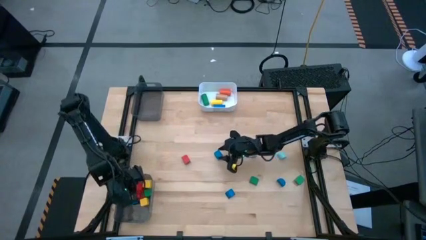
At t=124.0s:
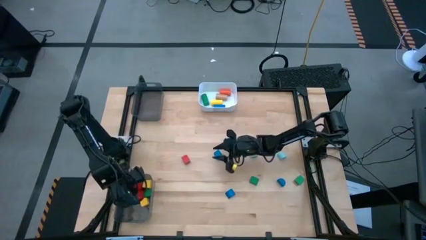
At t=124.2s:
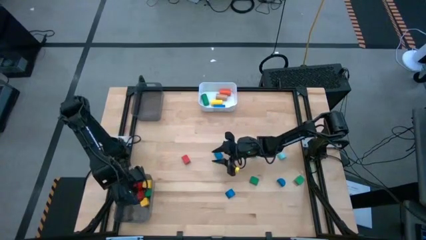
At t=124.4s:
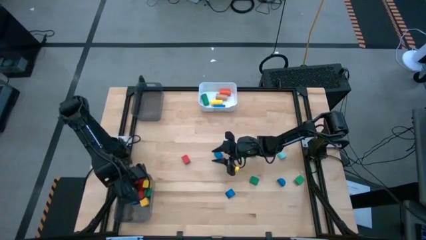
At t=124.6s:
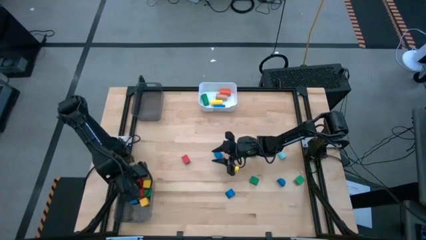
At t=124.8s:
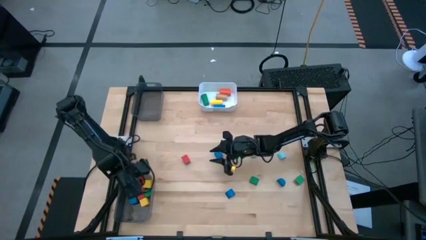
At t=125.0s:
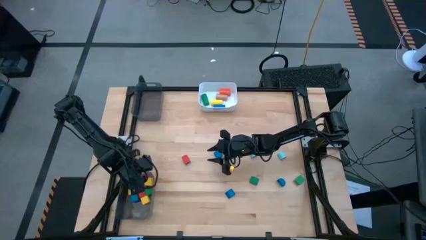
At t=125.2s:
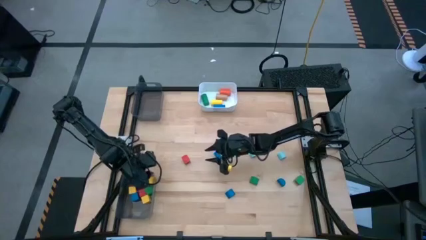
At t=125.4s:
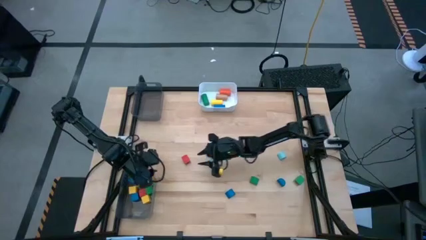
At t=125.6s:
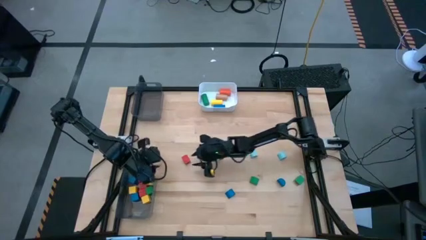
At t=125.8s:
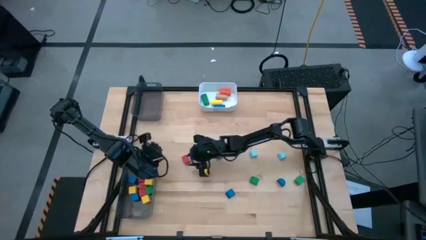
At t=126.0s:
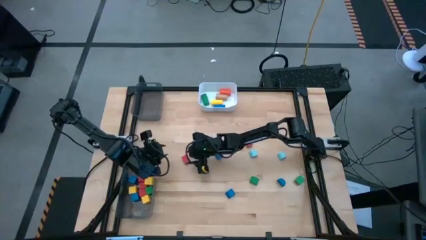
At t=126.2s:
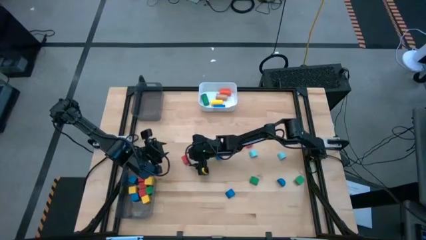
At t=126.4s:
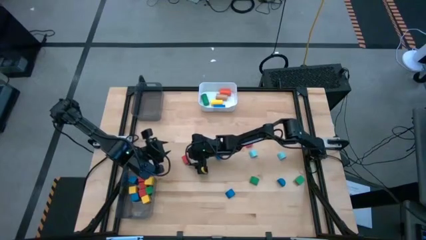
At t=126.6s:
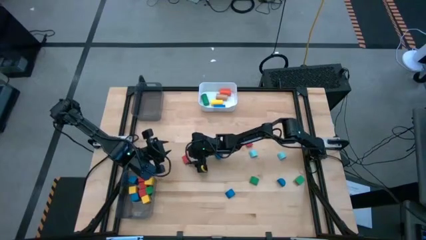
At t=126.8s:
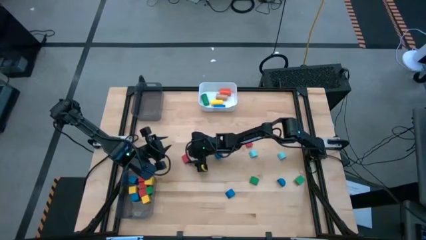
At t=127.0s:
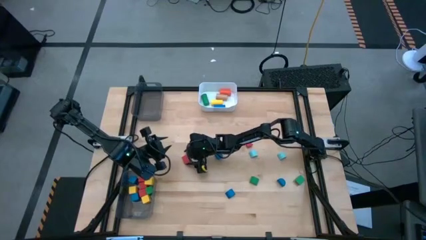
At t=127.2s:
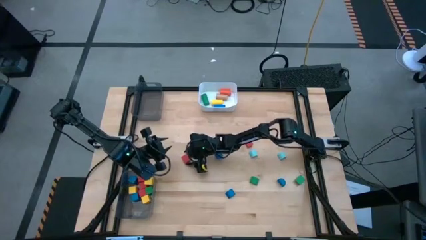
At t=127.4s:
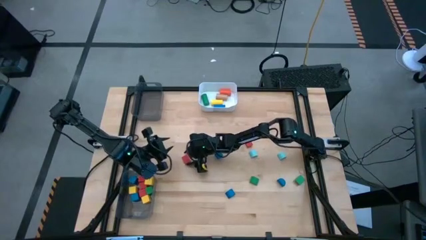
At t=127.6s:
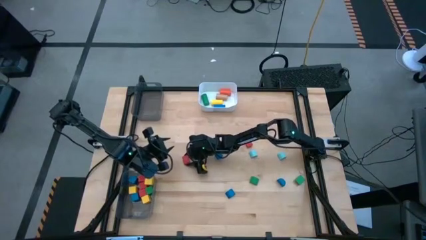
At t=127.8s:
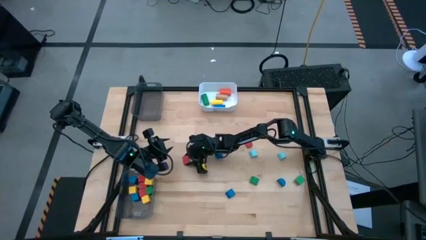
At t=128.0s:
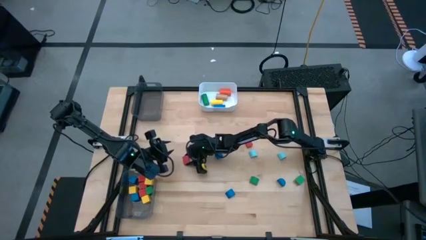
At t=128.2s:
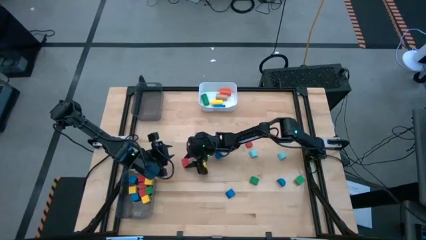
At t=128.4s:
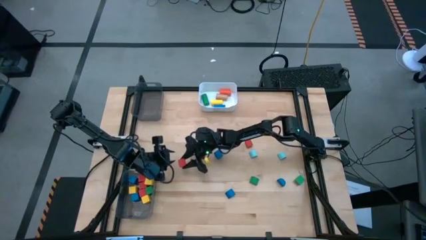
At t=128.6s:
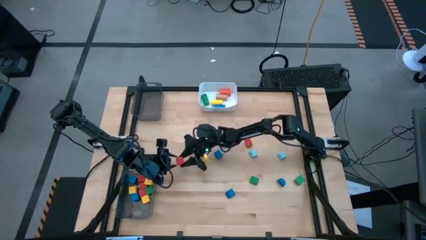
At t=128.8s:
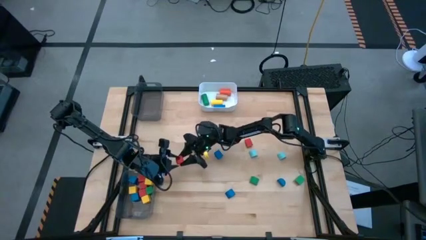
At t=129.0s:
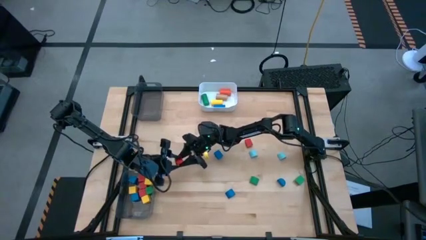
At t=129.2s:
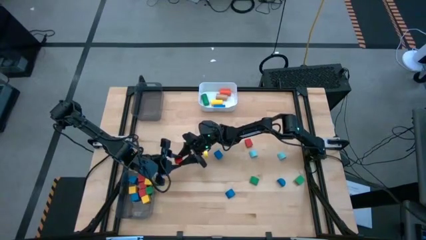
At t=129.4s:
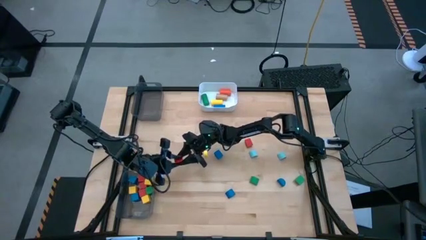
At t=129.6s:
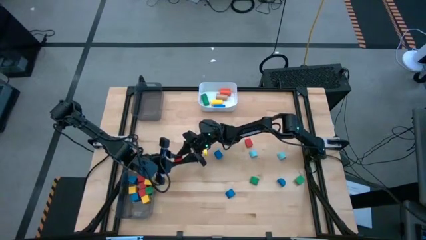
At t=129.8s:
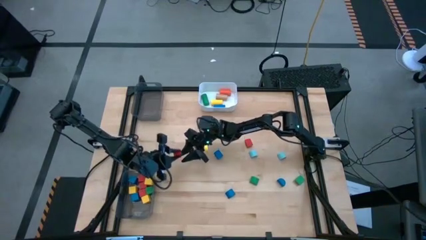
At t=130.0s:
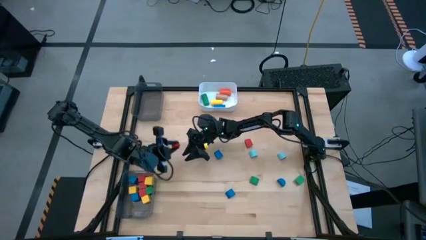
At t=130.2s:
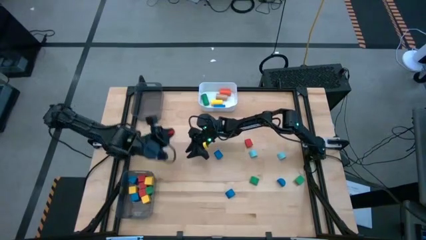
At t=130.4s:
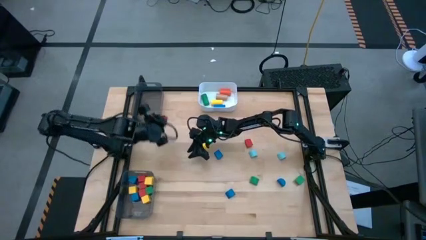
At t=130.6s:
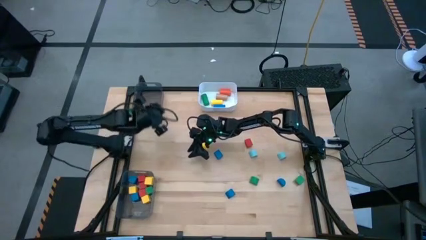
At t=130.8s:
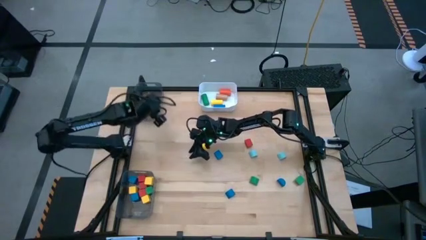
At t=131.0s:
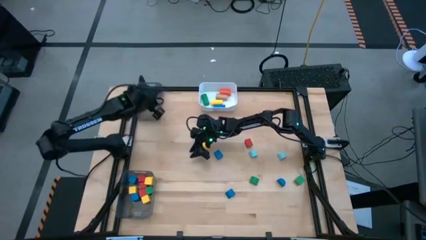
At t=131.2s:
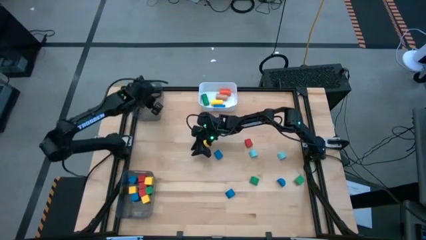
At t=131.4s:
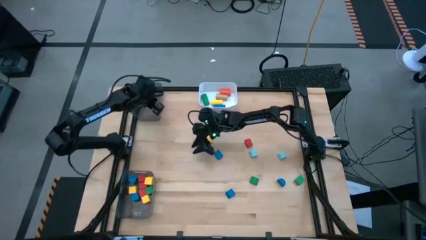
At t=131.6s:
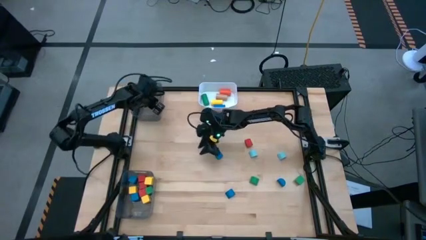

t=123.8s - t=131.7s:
Task: Sort blocks by size
Put the red semicircle block into the top black bin

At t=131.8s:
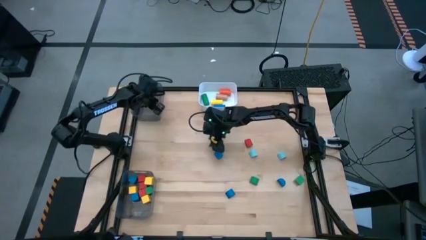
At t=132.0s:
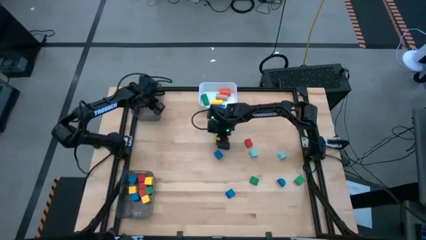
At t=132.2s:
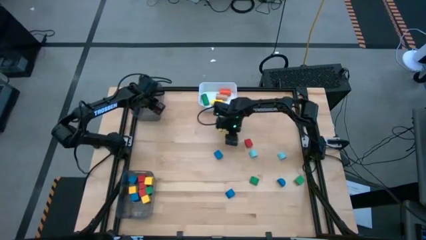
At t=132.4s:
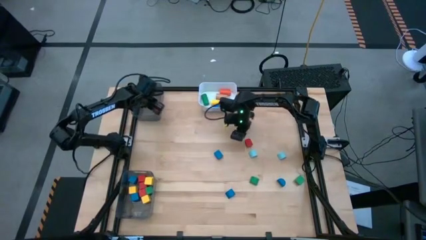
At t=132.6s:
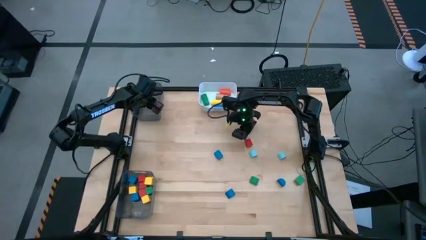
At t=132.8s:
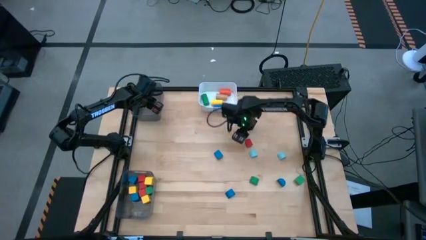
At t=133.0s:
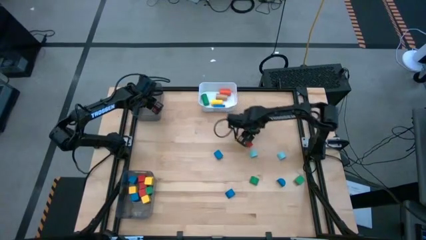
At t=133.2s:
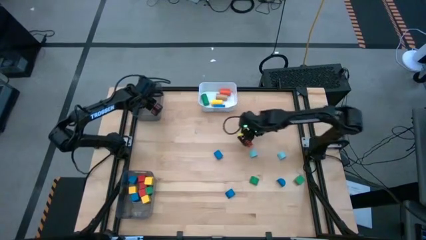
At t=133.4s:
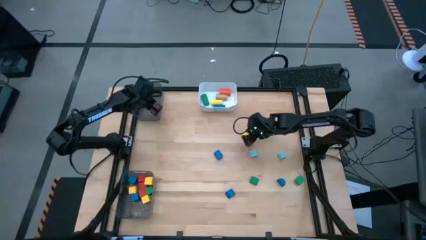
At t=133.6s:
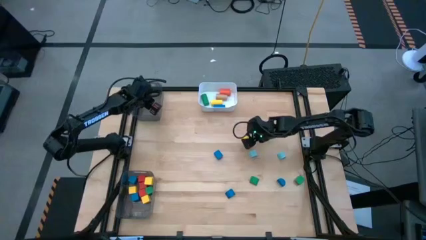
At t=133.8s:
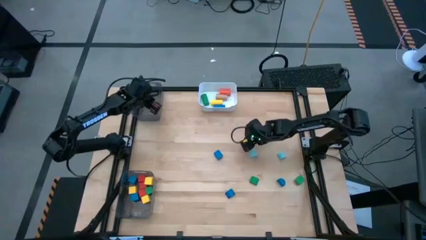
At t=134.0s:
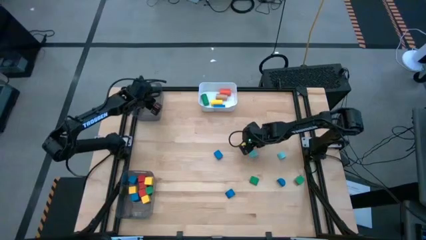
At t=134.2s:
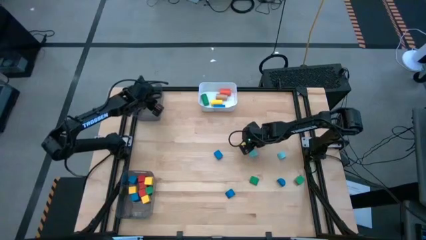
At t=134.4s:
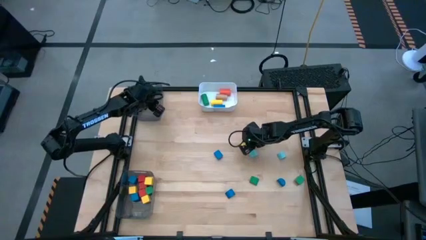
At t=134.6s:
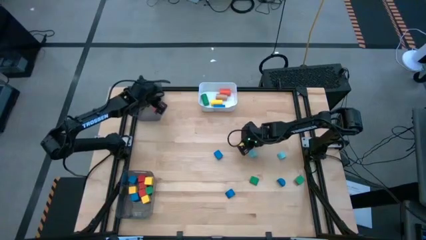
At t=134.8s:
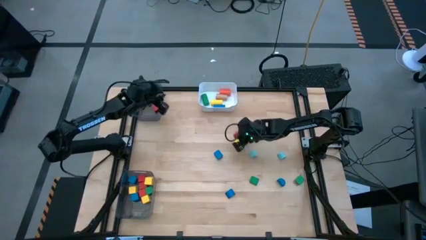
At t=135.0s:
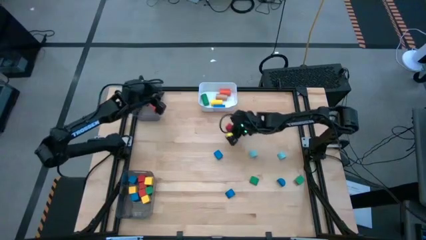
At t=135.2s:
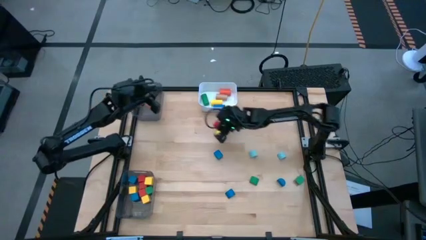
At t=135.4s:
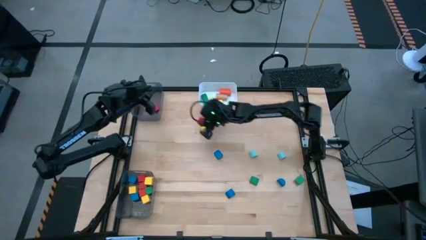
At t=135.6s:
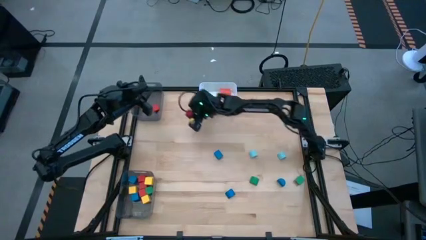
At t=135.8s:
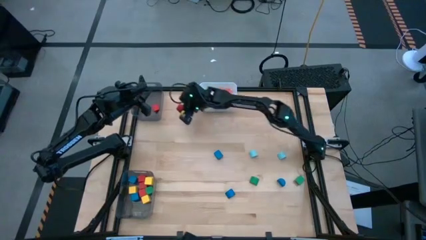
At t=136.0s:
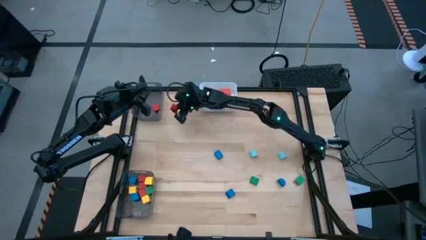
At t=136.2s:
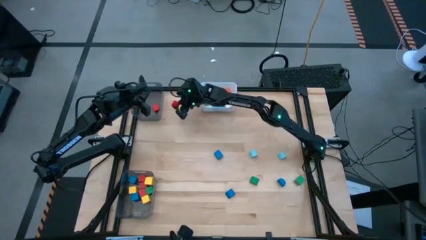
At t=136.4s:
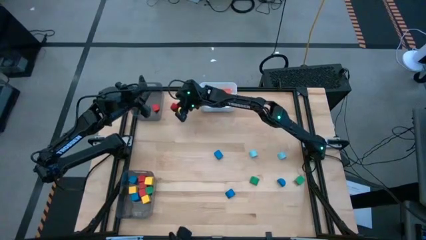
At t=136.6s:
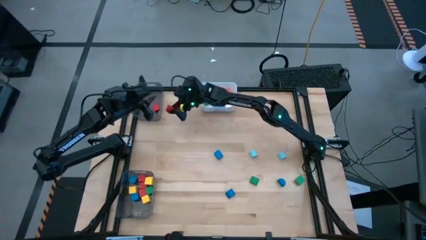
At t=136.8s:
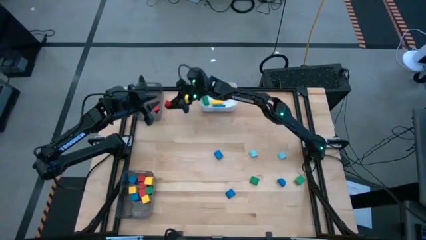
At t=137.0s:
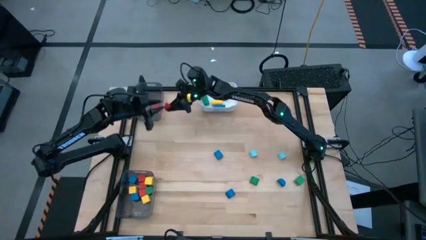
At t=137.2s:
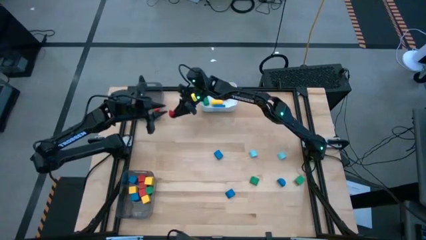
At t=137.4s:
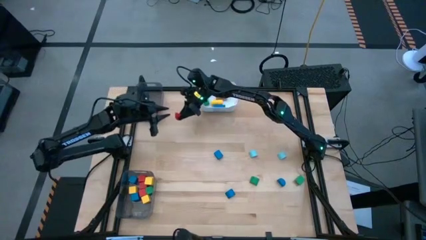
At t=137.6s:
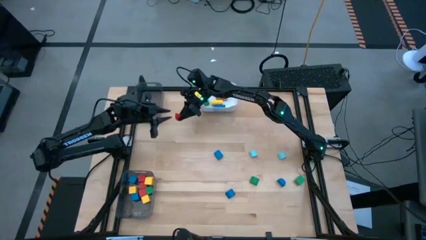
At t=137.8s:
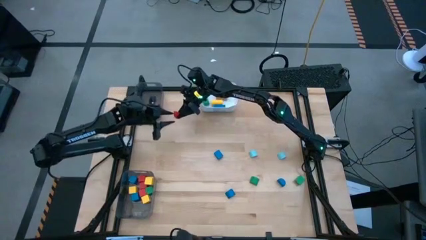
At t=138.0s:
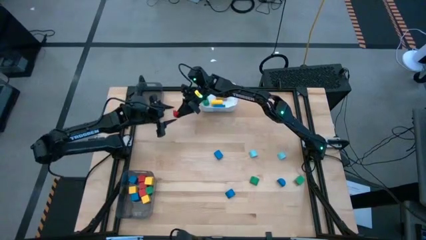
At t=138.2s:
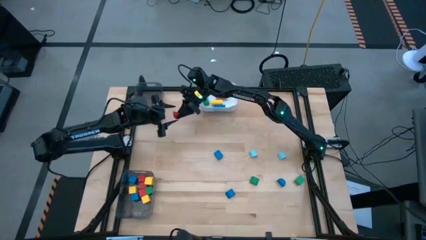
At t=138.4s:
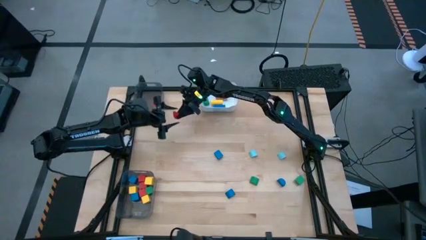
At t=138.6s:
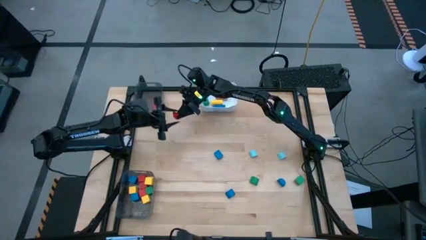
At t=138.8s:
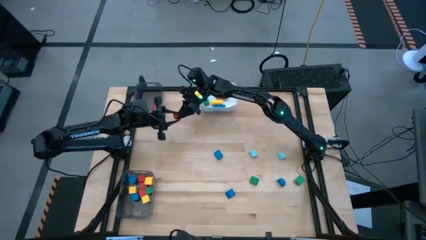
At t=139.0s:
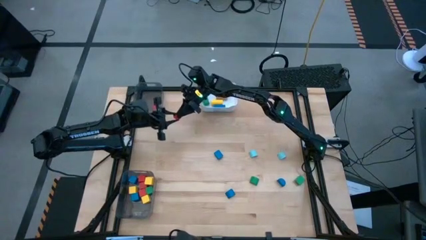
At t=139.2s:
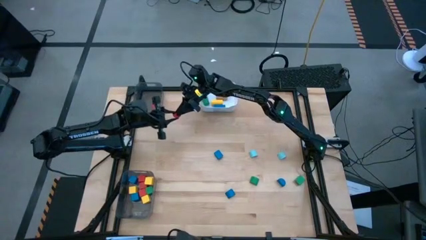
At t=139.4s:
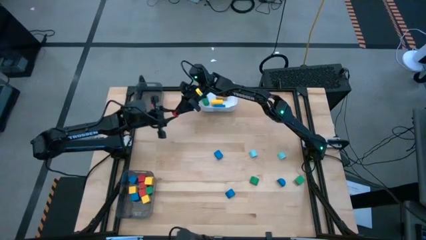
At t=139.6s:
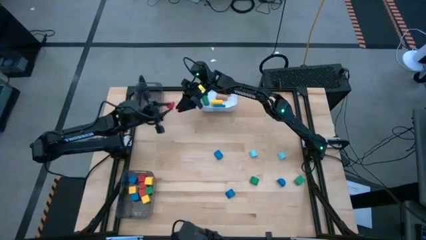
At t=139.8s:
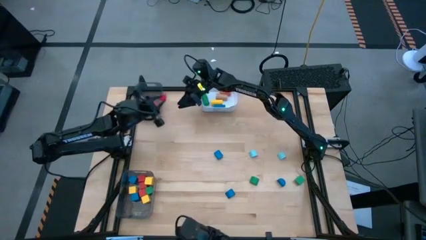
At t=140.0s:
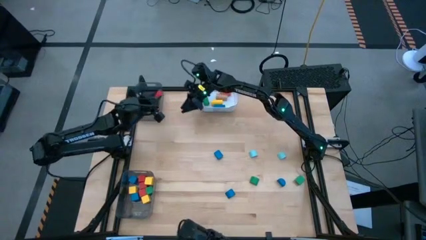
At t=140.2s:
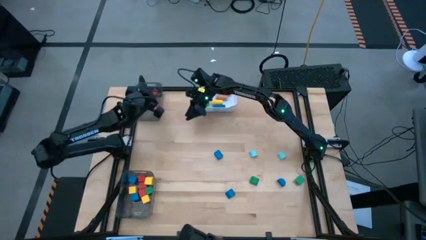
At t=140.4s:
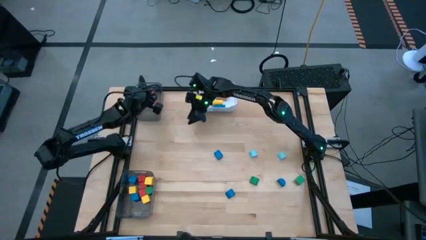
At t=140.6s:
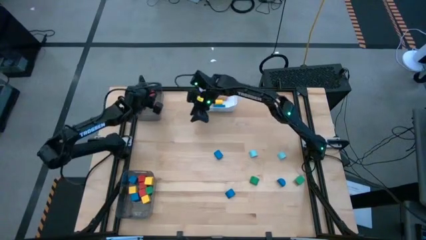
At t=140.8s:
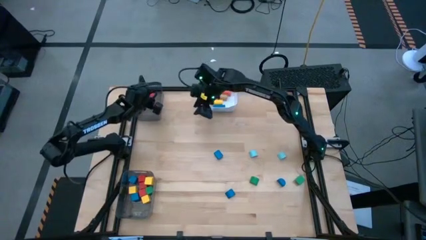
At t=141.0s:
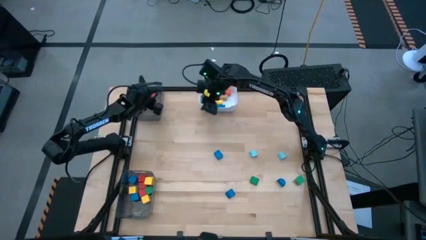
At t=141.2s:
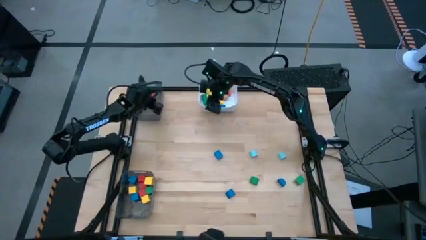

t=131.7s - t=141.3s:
Put the red semicircle block into the top black bin
